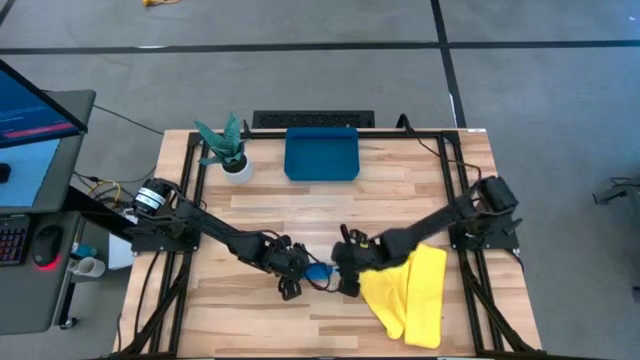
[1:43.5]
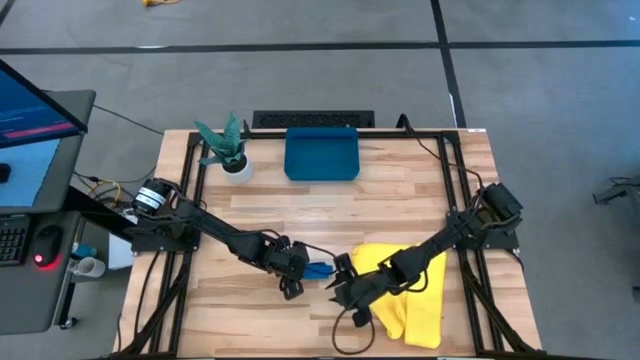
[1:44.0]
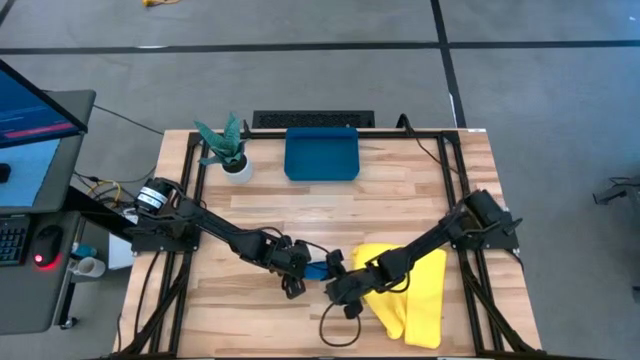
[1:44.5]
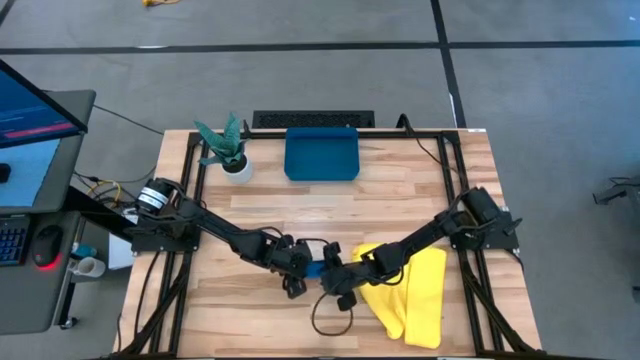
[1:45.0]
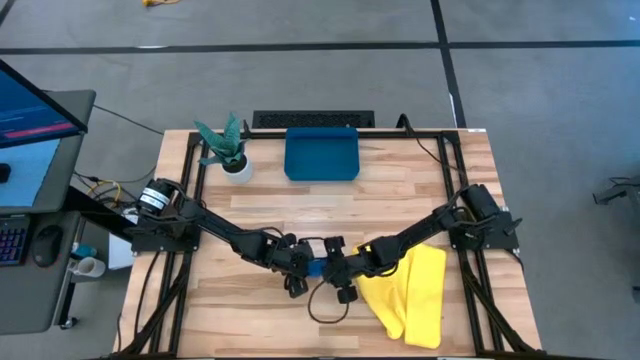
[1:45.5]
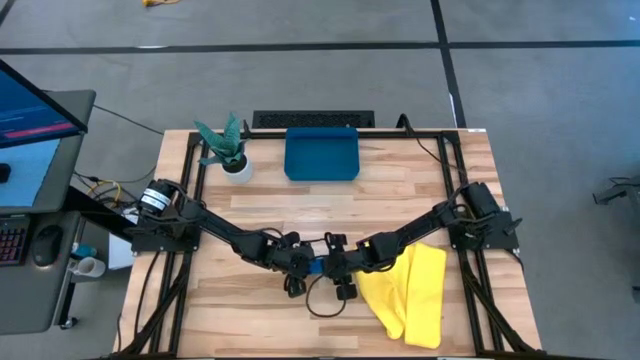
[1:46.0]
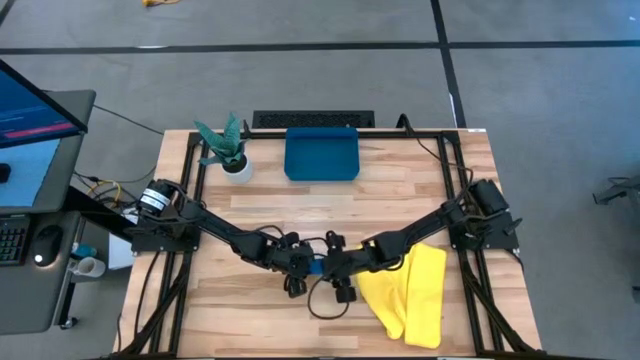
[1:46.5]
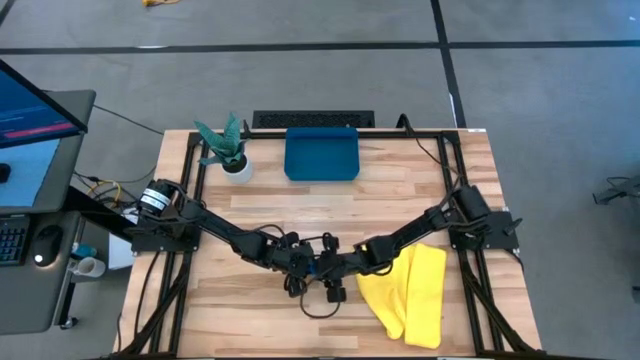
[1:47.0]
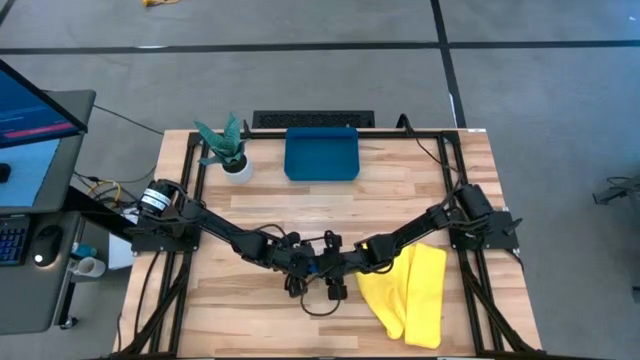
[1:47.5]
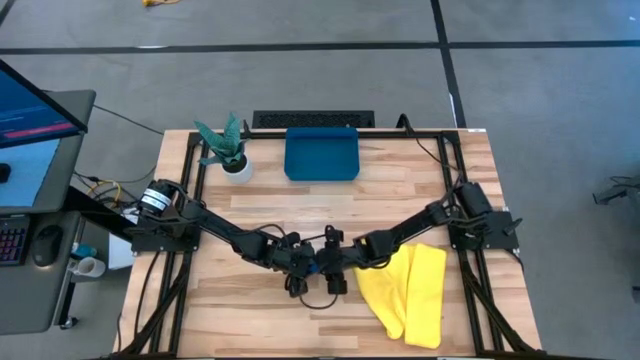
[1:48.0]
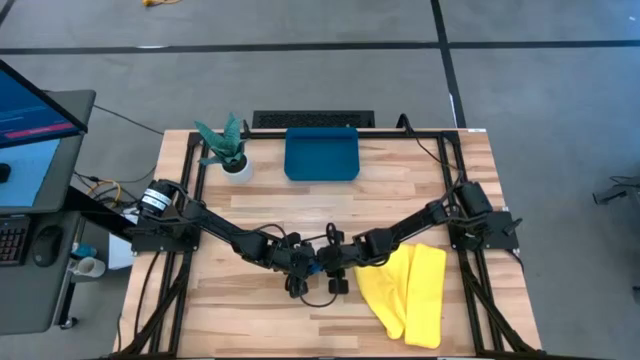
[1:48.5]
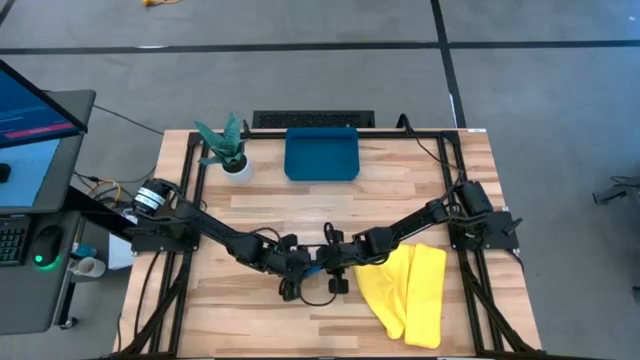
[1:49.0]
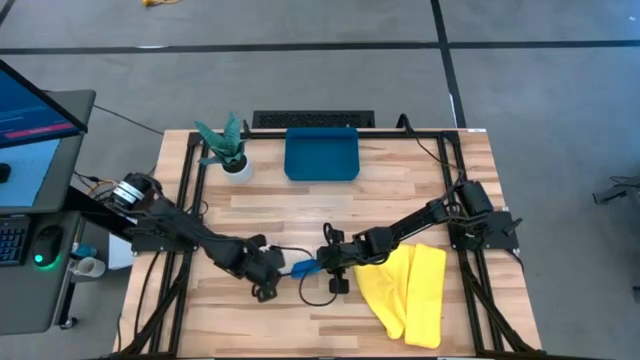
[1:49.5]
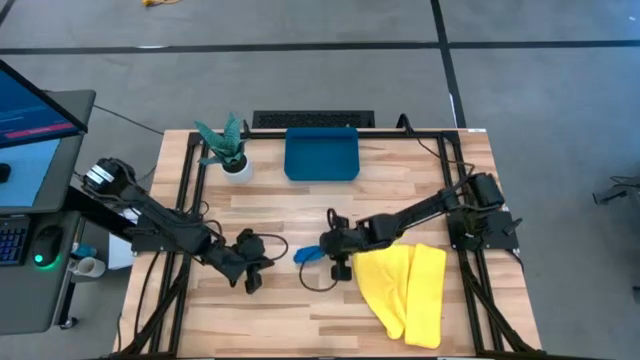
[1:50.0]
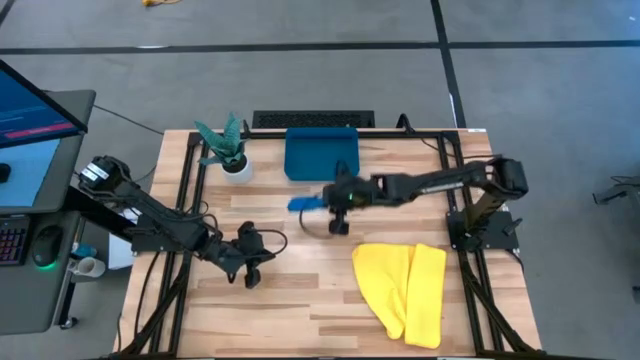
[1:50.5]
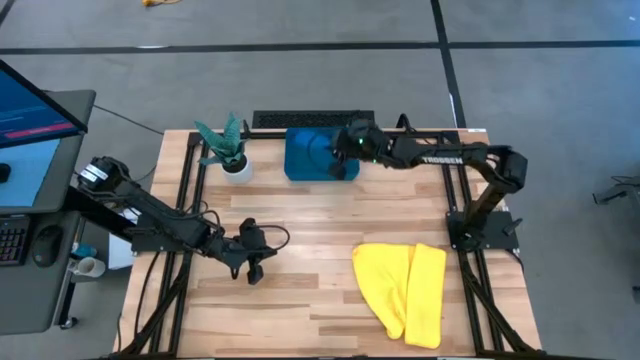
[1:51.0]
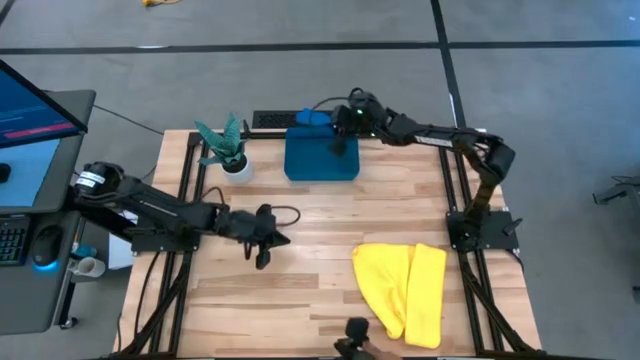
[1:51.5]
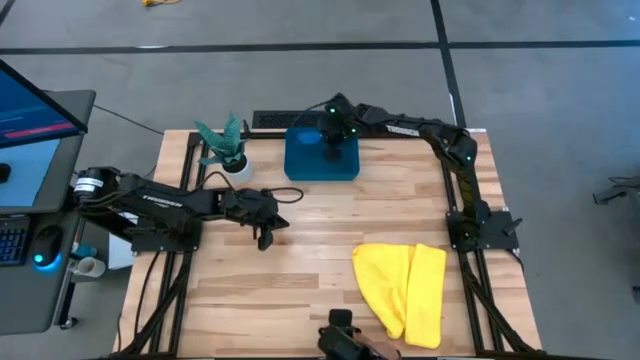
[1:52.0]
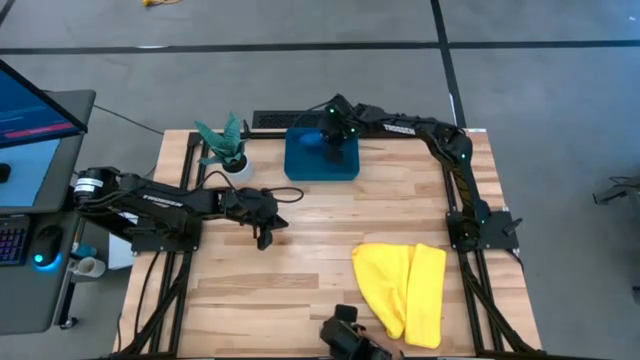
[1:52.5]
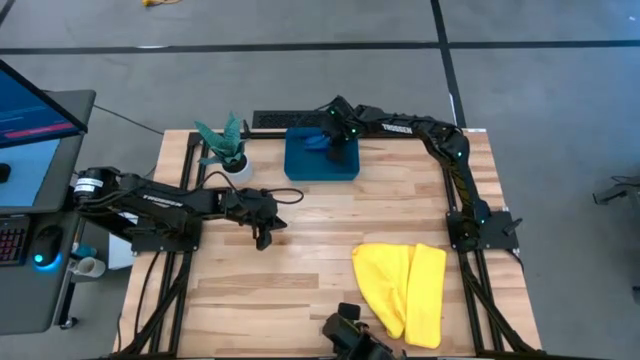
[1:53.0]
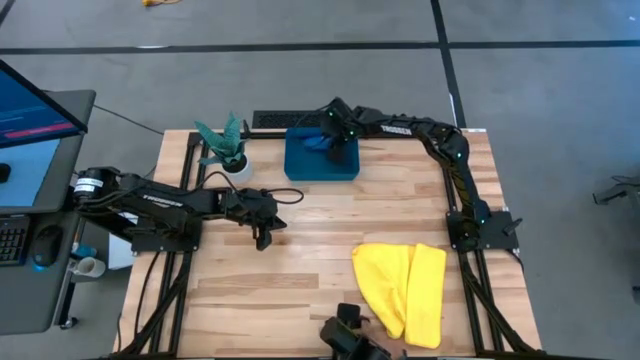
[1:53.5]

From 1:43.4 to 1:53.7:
Task: Roll microfiber towels into tight, uniform cylinder then place into a basket
Put the rolled blue microfiber towel into the blue bin

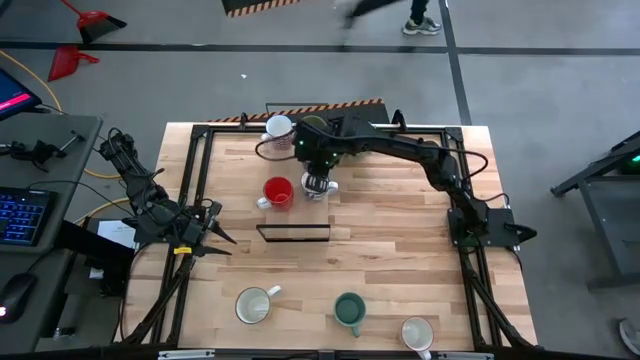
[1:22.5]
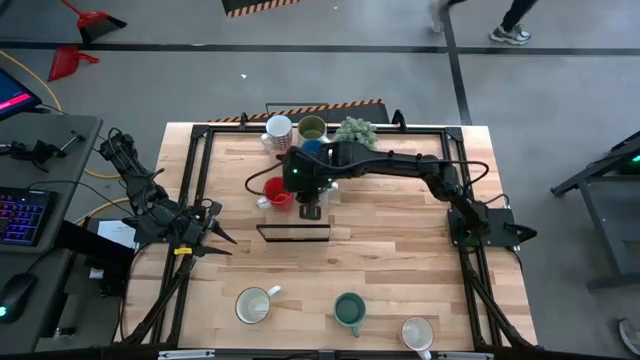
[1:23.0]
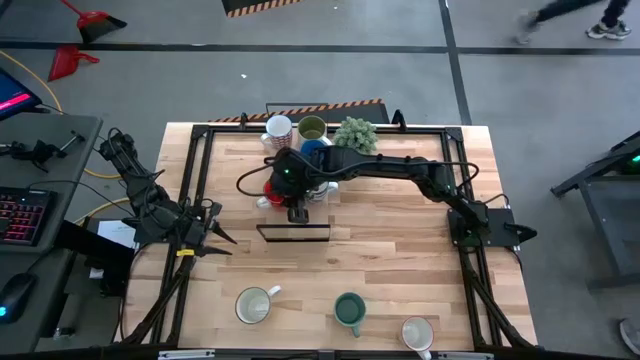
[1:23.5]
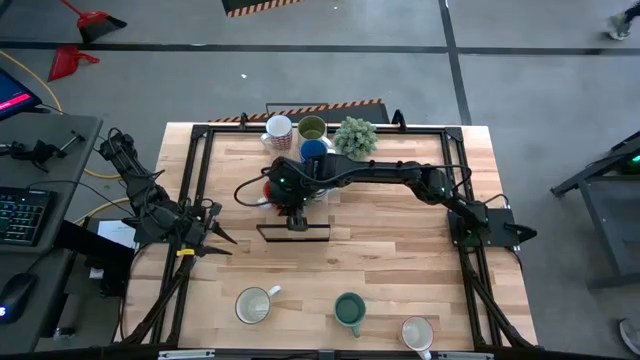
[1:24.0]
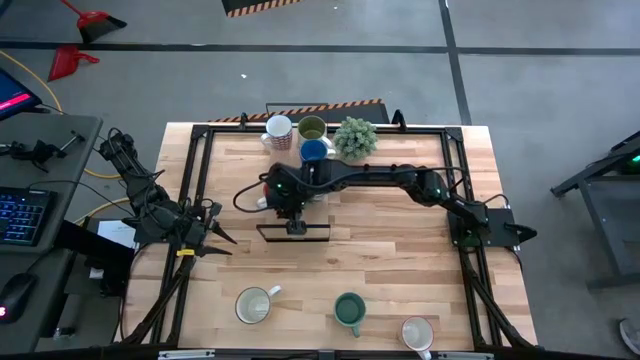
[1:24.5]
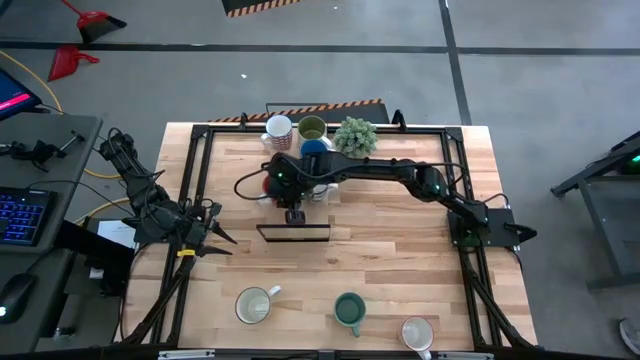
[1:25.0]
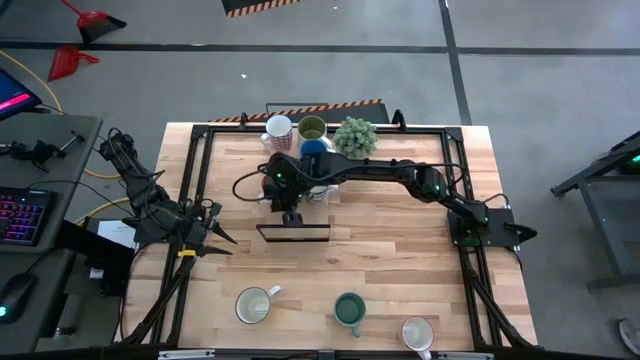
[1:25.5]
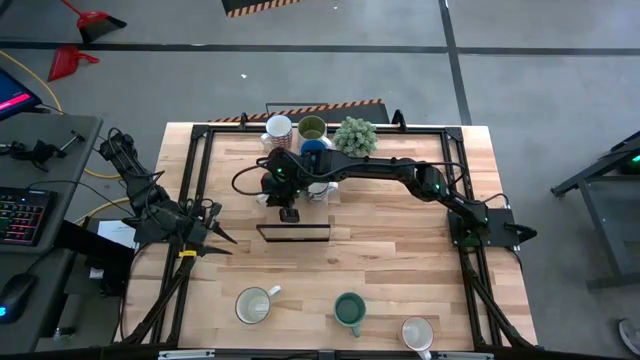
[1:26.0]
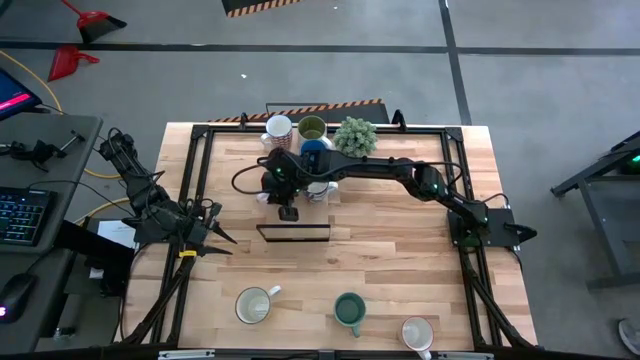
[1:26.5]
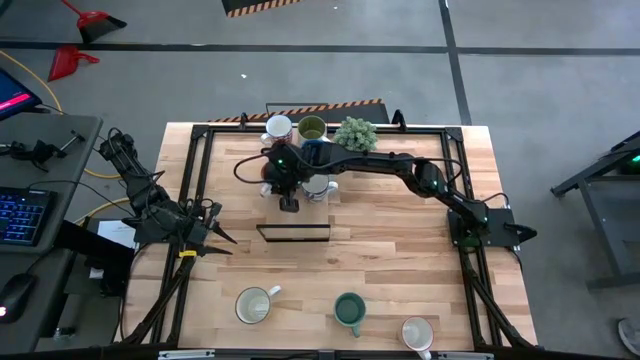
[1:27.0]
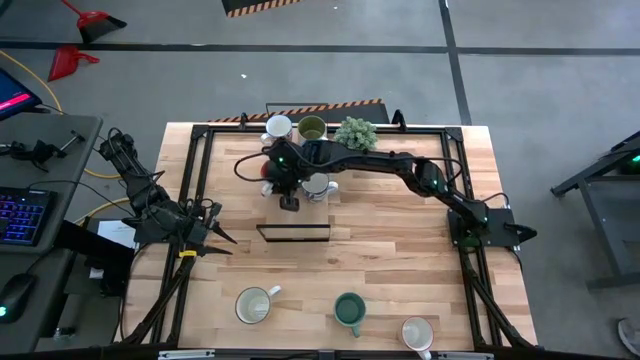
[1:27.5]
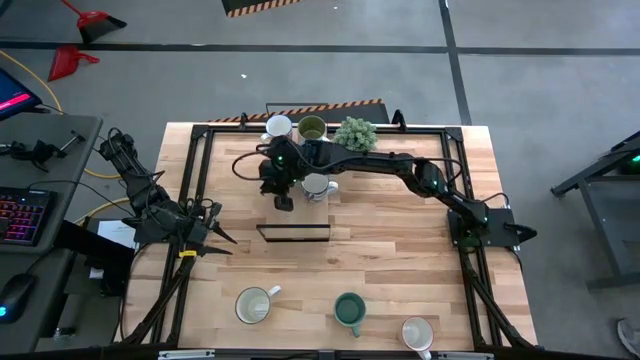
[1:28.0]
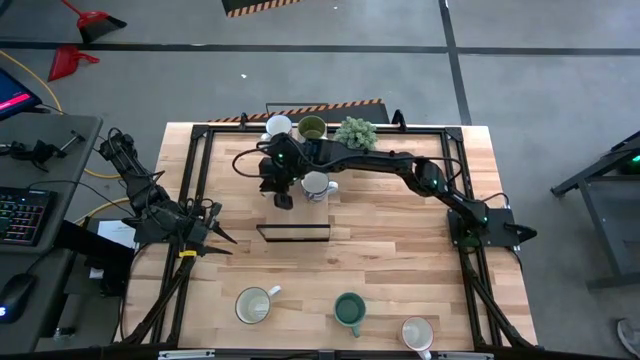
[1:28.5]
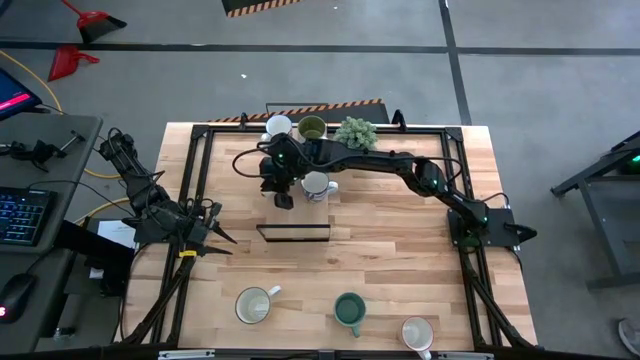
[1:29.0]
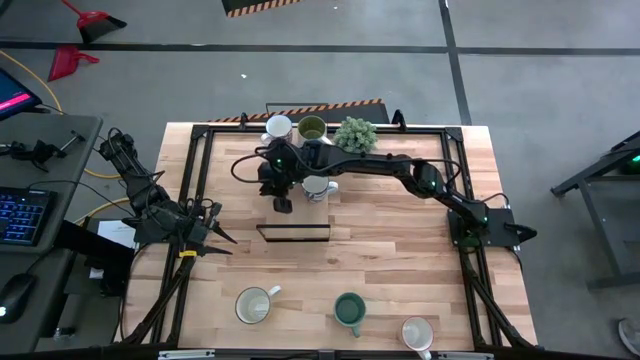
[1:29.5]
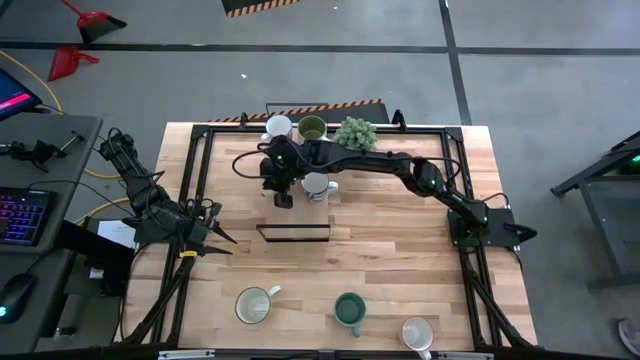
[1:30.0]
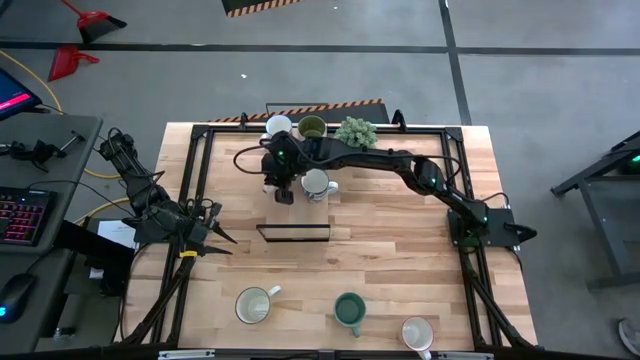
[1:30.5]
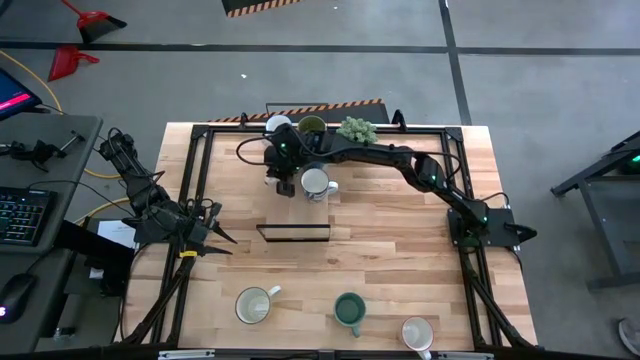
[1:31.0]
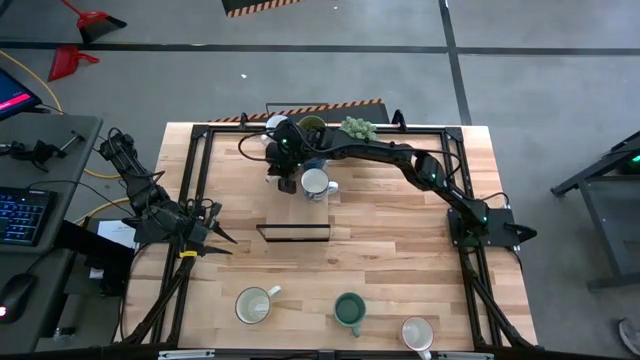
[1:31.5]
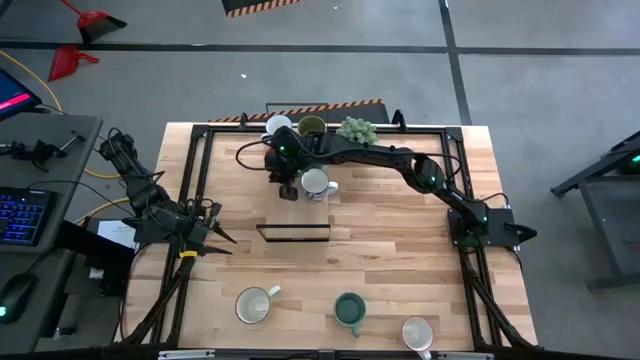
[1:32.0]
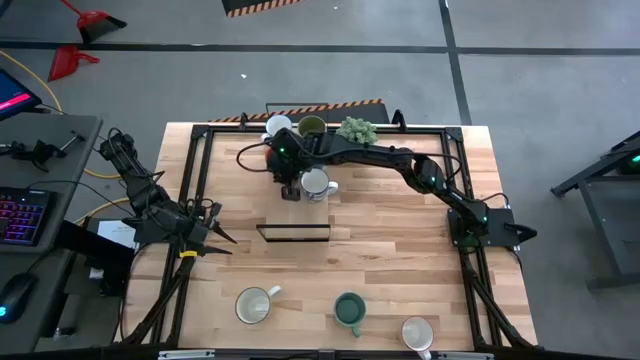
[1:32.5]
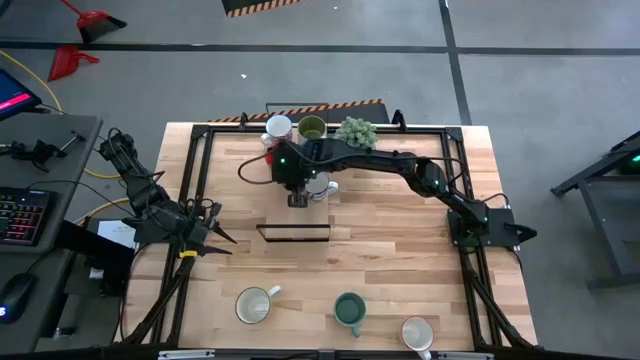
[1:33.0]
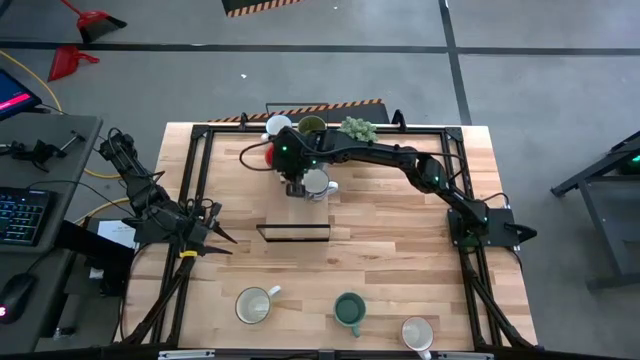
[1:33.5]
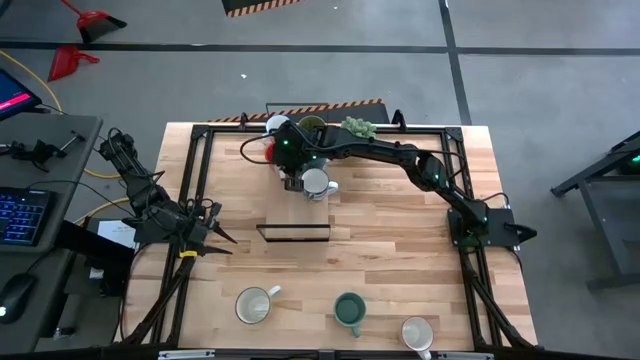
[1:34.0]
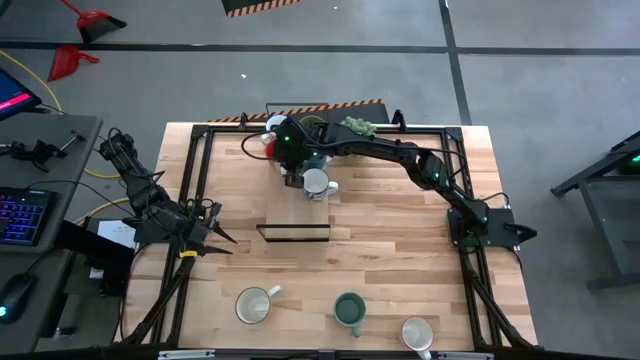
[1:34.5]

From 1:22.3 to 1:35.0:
Task: Place coffee mugs
Adjust the red mug on the shelf
